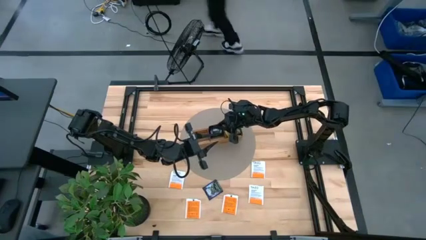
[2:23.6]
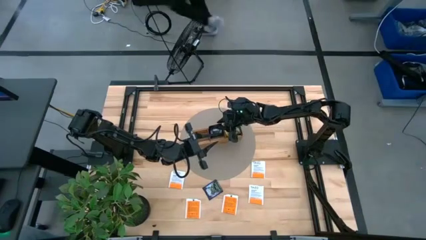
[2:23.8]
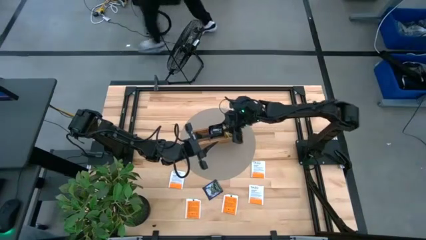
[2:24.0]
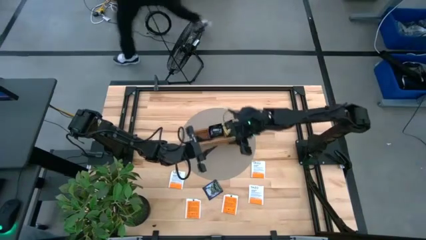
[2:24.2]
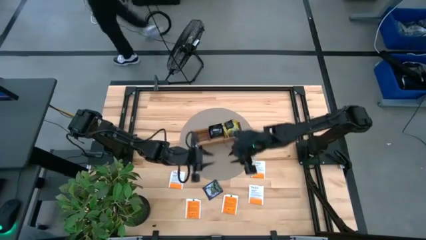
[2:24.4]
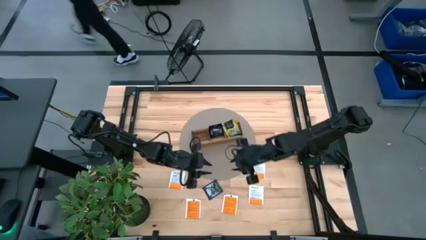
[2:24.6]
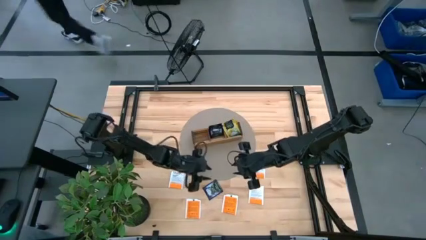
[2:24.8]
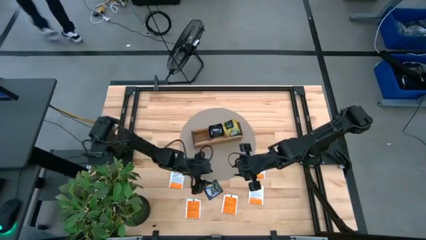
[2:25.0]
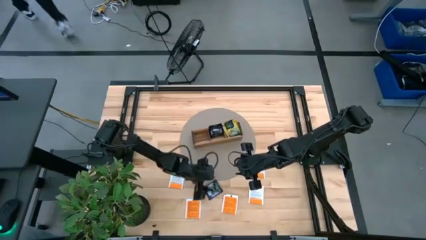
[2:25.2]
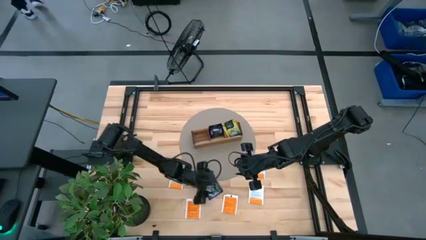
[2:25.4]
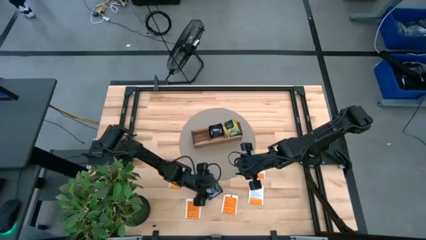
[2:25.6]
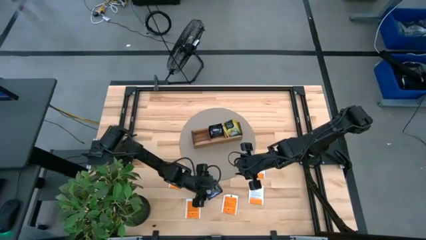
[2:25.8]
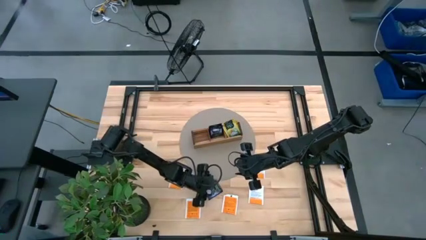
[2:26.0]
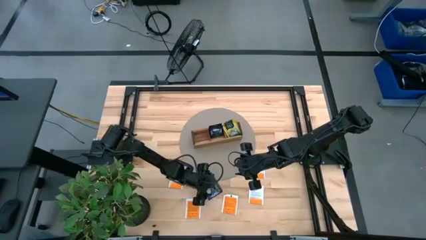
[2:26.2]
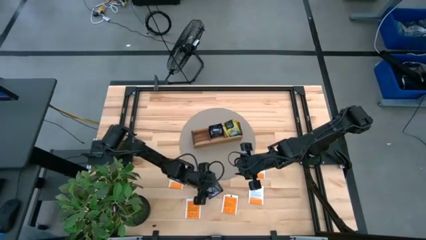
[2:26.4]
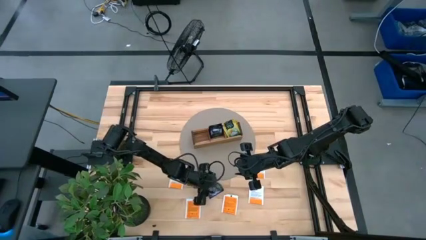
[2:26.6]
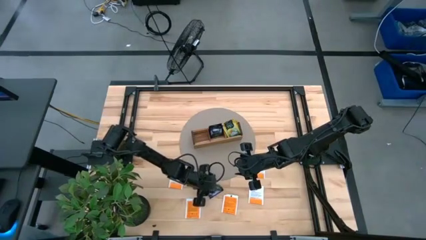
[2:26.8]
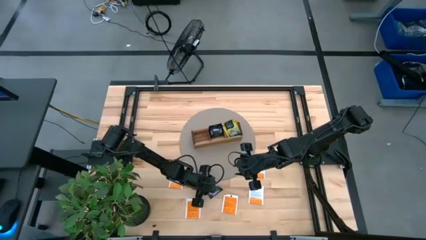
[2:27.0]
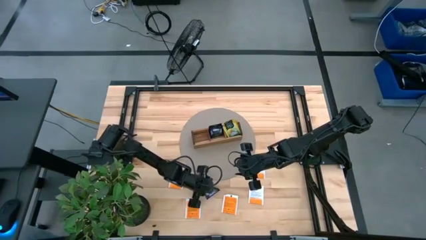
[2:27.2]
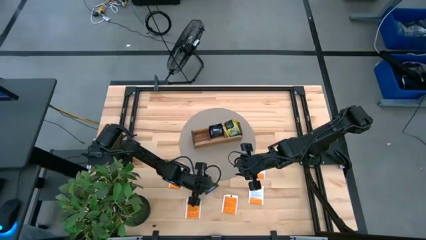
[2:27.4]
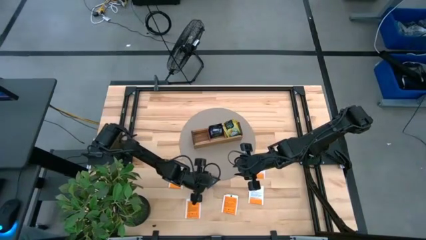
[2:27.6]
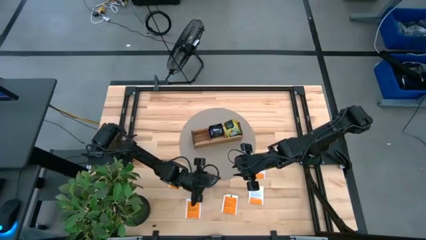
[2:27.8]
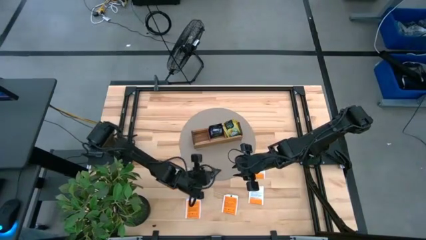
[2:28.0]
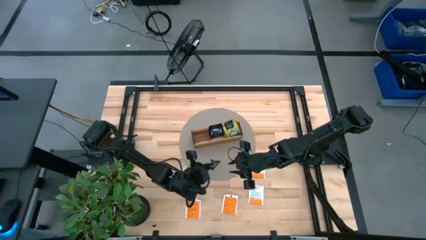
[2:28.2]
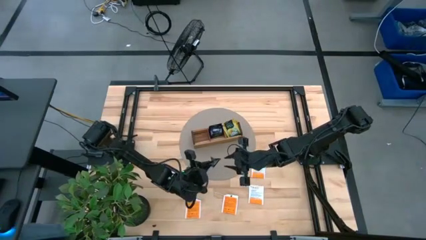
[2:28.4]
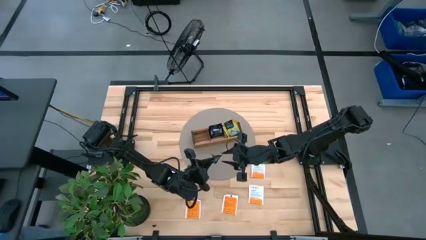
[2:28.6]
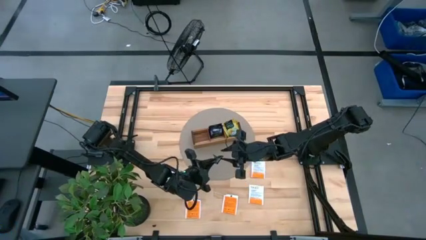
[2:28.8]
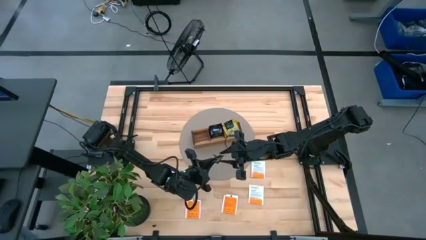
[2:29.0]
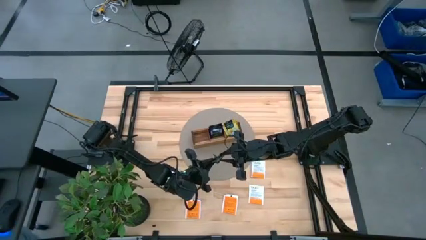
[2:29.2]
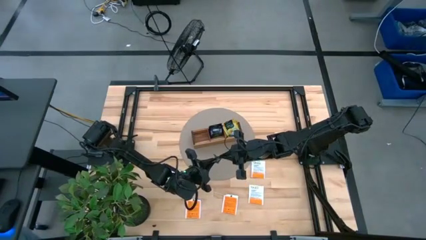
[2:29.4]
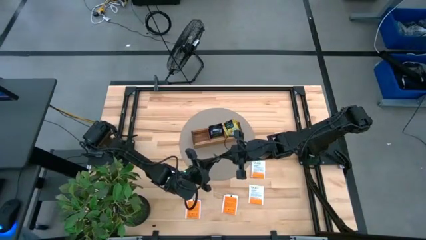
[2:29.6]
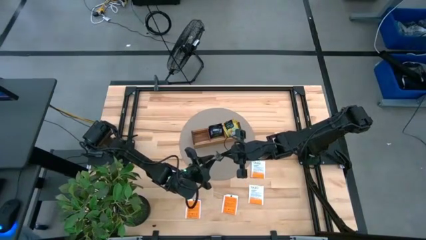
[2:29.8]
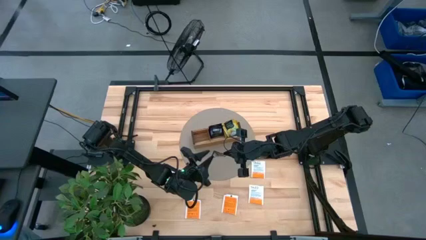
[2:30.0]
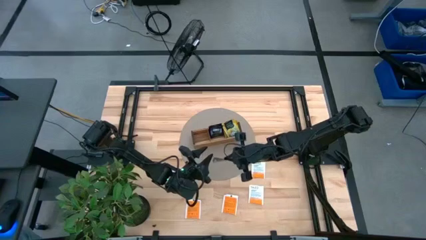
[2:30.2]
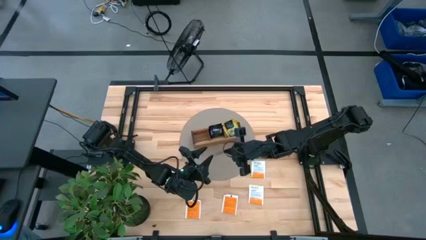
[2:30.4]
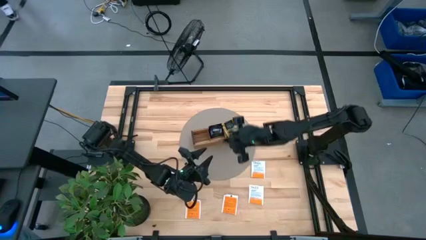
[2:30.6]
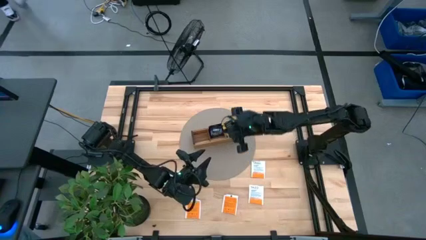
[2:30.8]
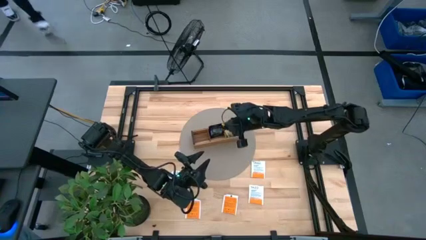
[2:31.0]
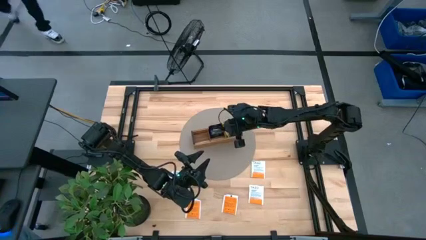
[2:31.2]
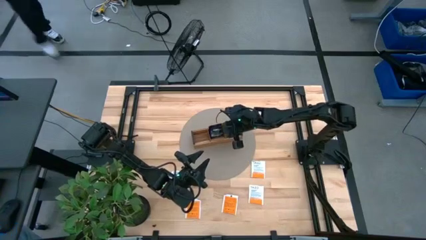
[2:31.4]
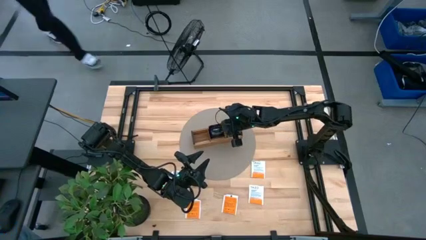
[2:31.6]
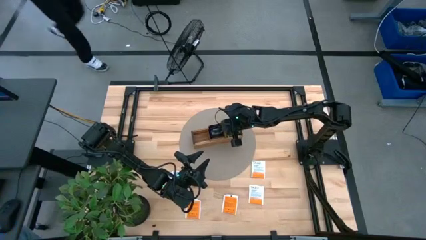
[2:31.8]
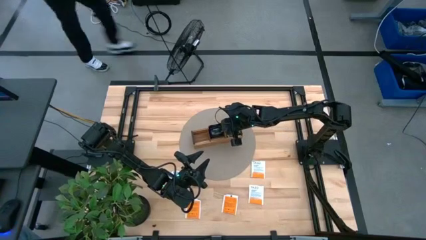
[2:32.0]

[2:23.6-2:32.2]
Task: Pick & Place Tea
Put the violet tea bag into the middle section of the wooden organizer

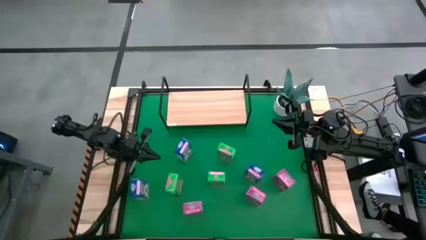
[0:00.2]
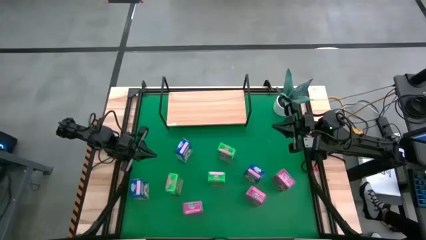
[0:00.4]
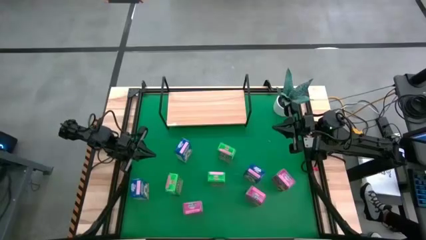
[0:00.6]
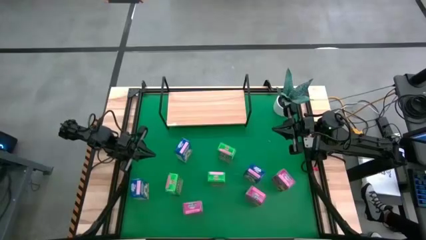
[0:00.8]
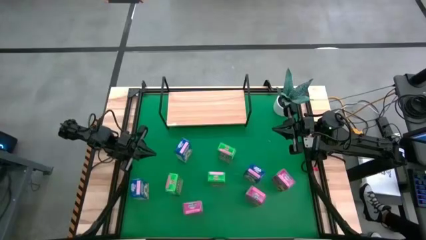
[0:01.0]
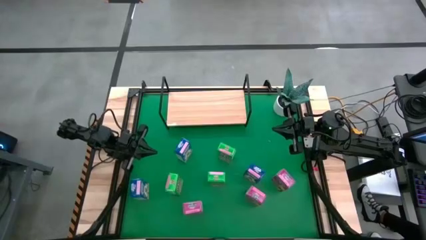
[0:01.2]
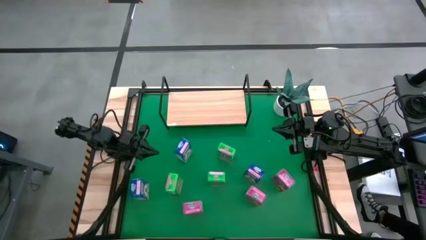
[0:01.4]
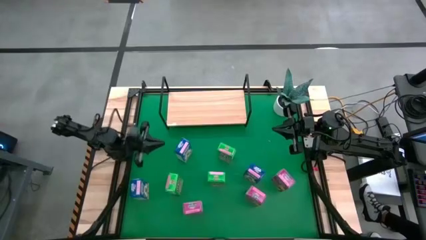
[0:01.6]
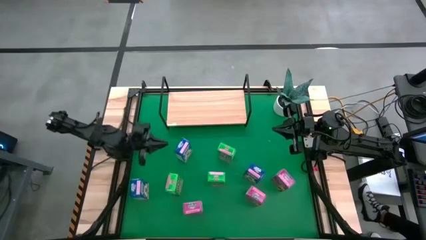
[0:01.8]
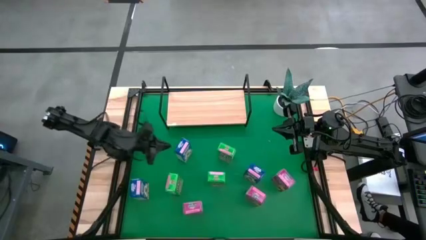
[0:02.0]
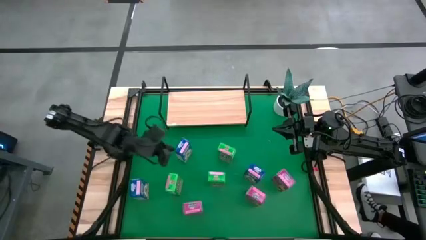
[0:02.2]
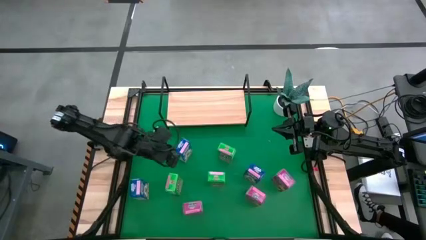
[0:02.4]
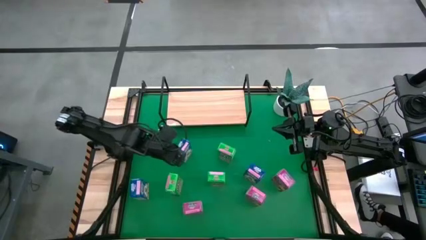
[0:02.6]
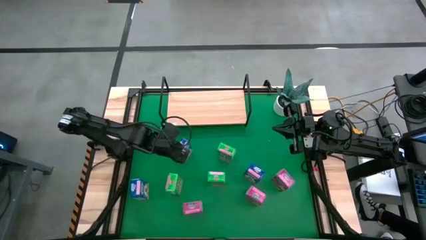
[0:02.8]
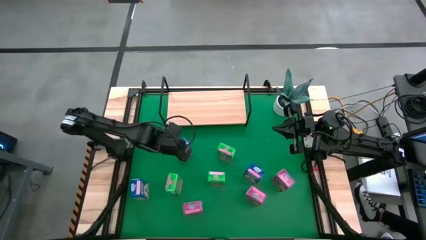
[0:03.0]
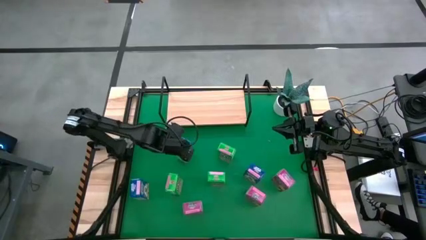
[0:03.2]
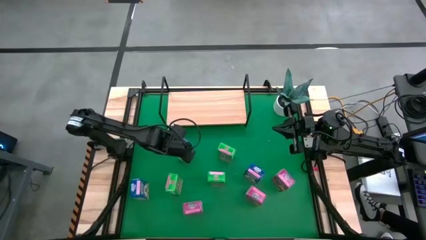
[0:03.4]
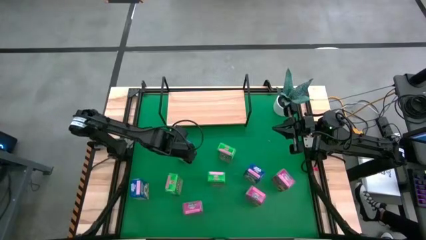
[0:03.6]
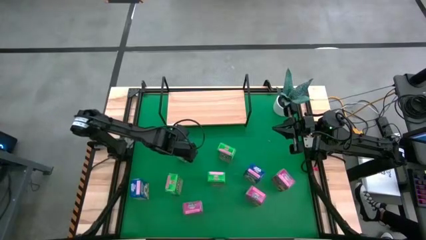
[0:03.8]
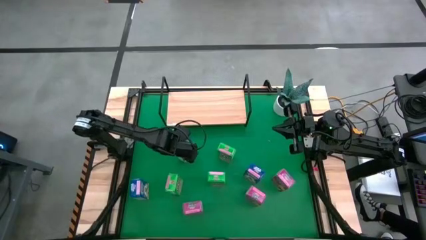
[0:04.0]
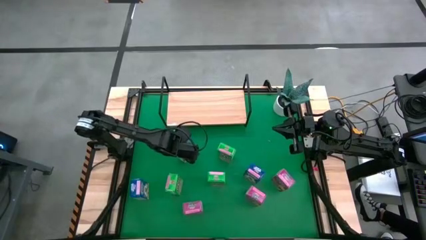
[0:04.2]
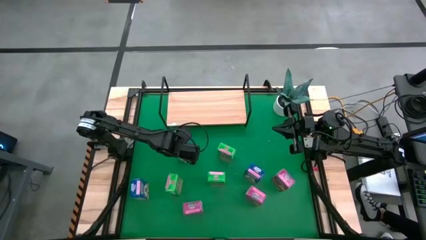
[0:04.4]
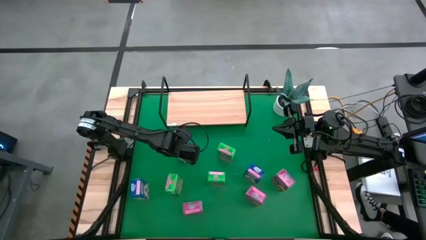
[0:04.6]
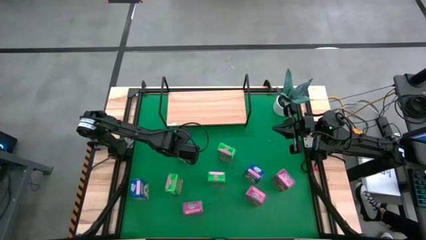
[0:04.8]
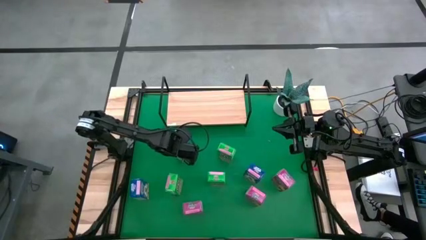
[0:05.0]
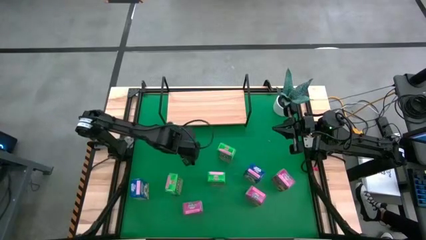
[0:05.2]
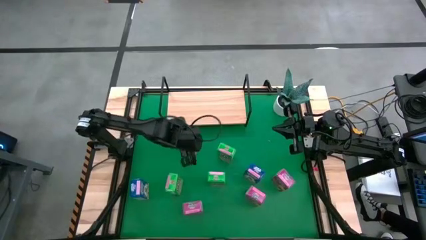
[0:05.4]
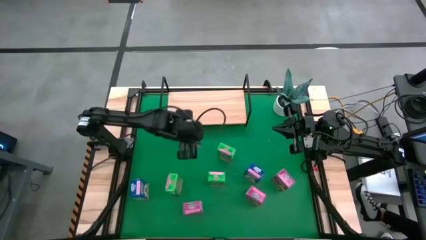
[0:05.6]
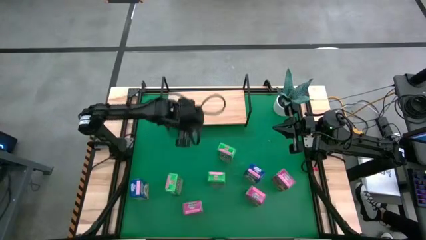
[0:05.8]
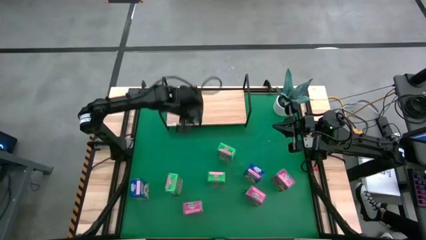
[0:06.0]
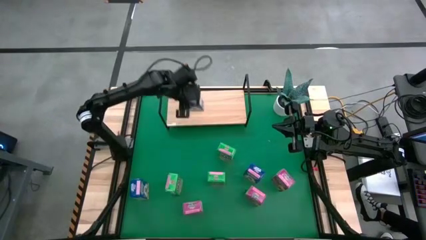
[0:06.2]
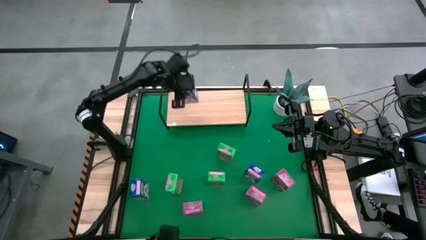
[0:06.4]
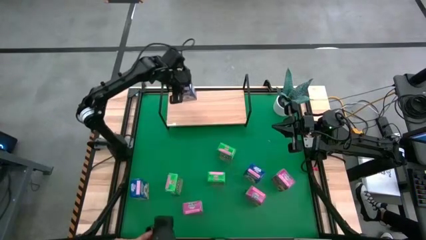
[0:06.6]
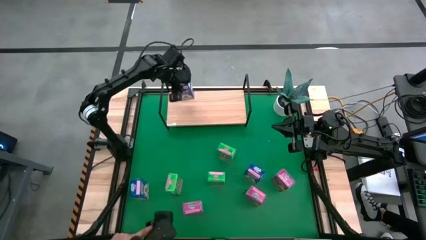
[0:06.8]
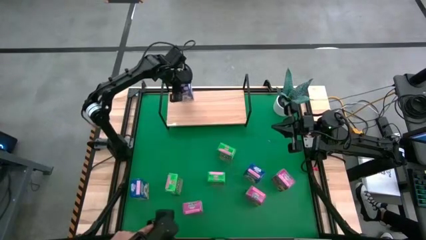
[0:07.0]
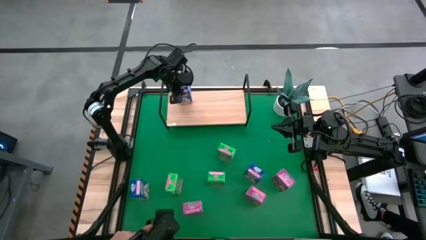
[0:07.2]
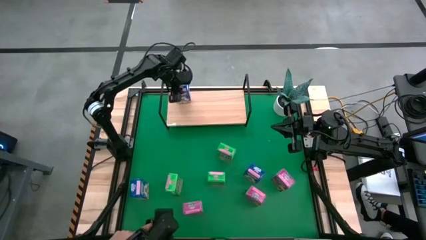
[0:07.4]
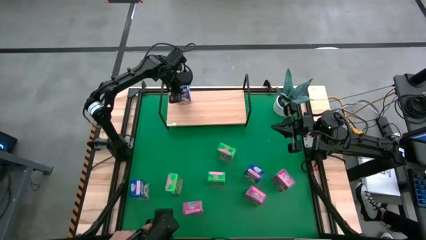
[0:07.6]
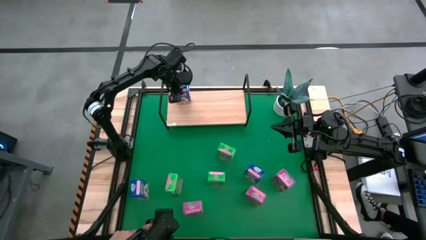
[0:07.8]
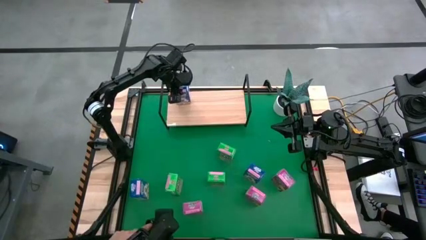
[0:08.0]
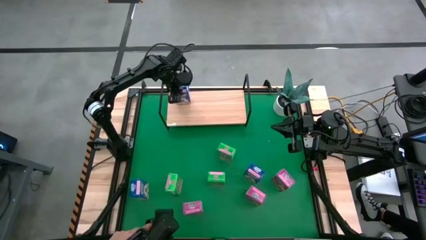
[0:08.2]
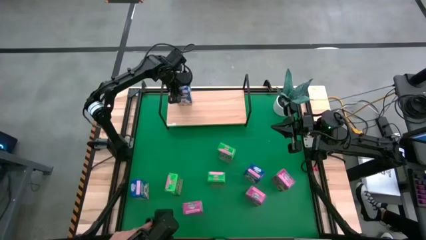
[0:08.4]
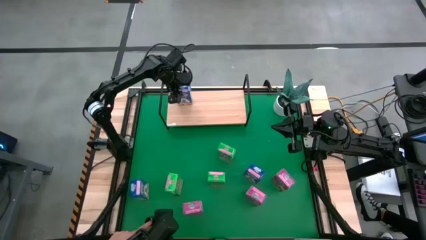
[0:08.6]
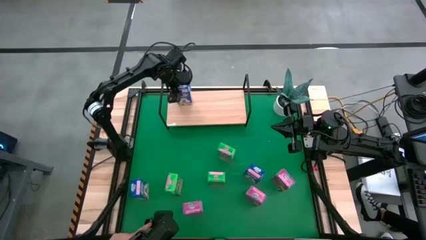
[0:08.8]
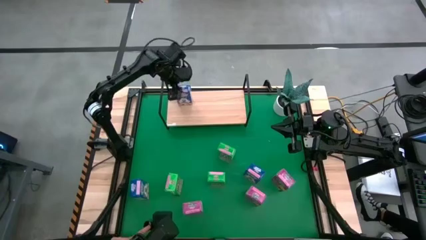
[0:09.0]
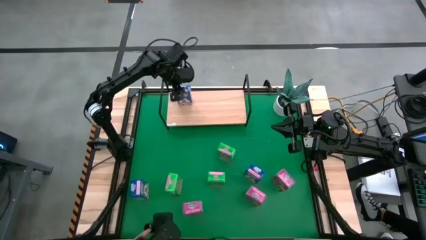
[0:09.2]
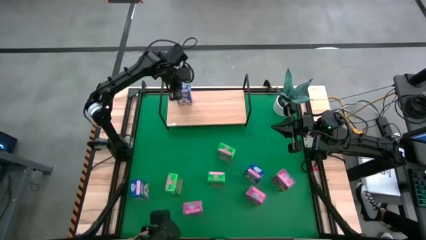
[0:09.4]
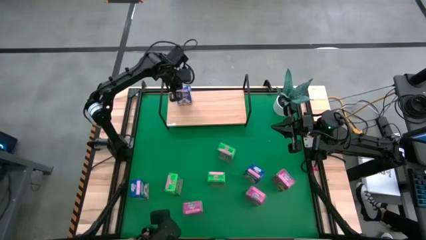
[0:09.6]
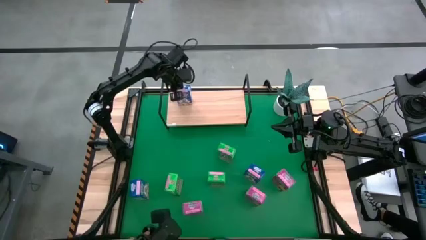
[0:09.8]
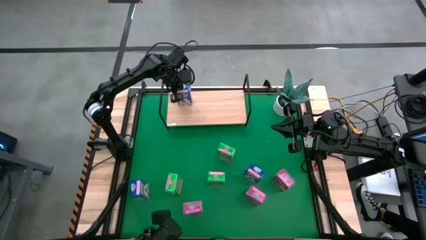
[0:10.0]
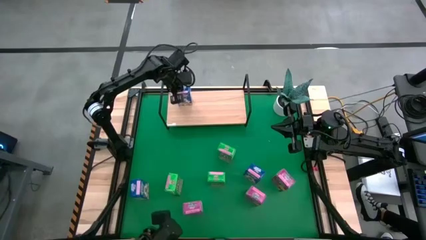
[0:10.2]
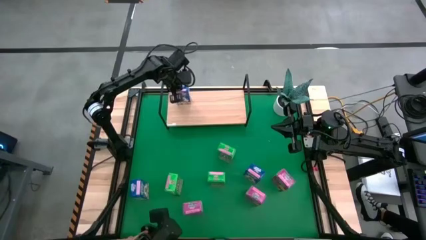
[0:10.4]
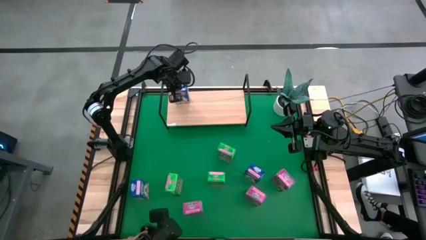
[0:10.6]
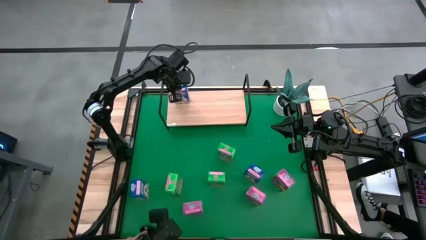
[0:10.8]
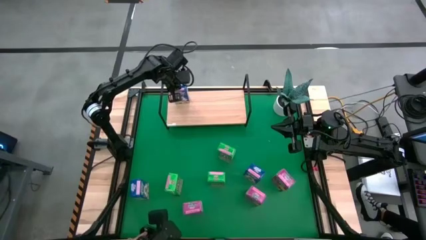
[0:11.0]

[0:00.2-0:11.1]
Task: Stack cereal on shelf
Put the middle blue cereal box on the shelf
